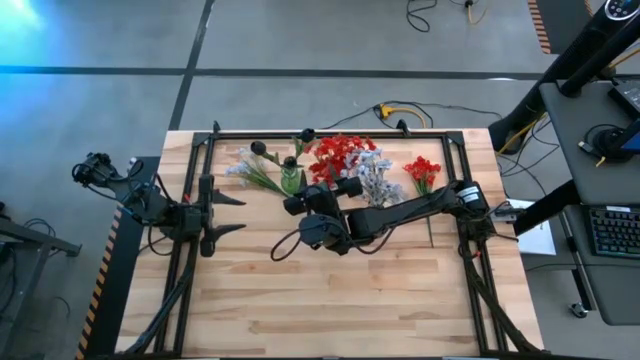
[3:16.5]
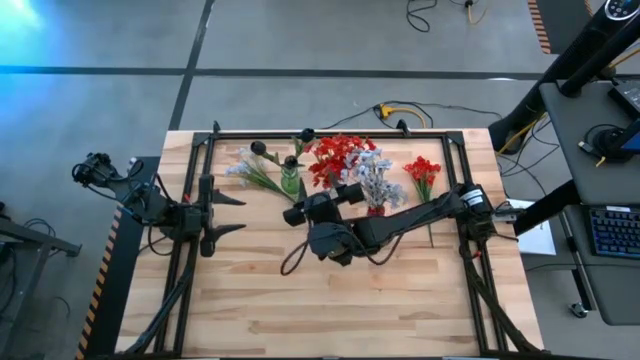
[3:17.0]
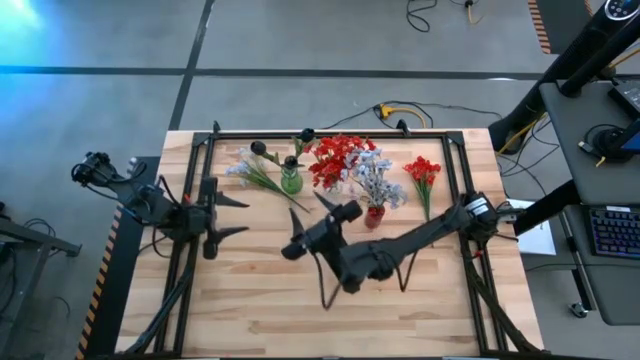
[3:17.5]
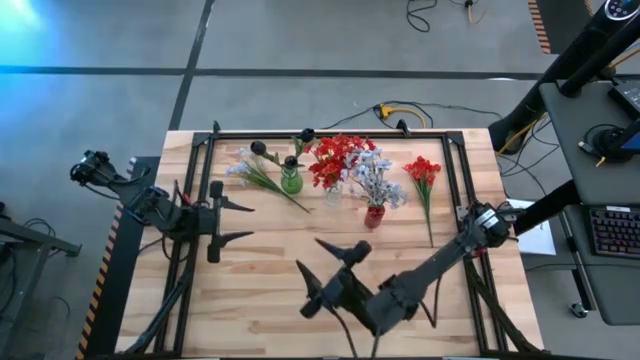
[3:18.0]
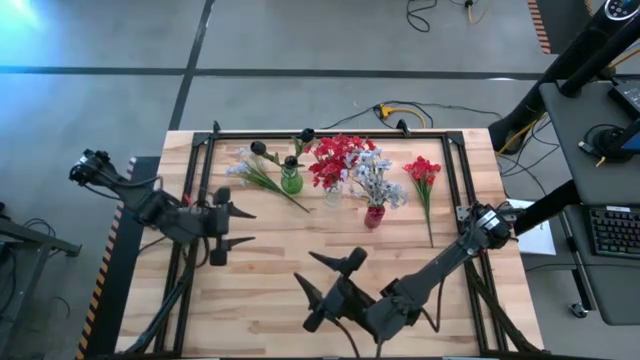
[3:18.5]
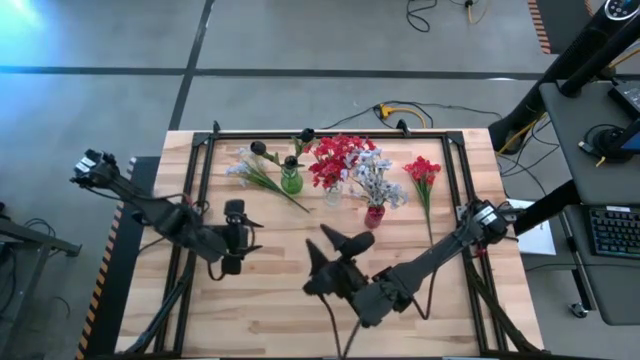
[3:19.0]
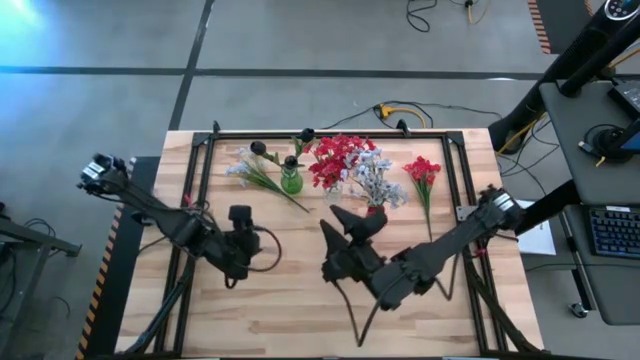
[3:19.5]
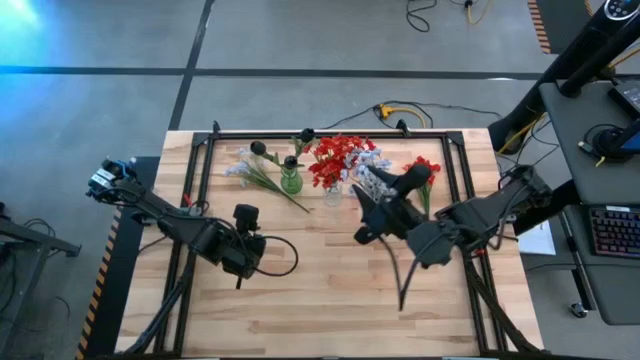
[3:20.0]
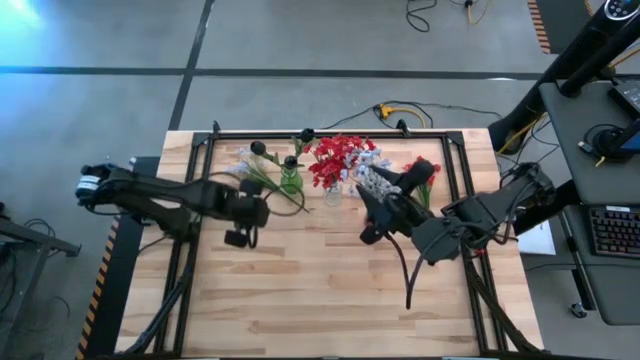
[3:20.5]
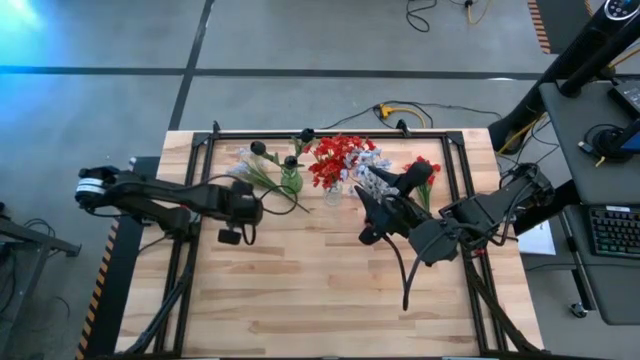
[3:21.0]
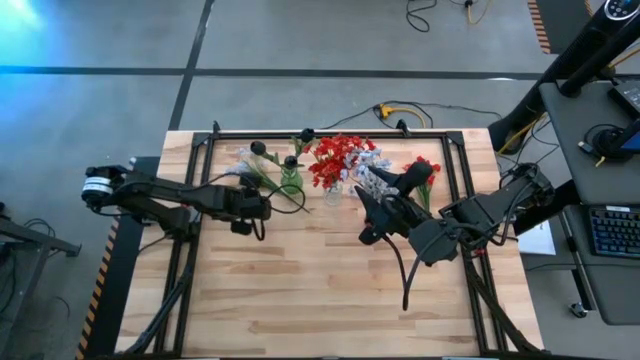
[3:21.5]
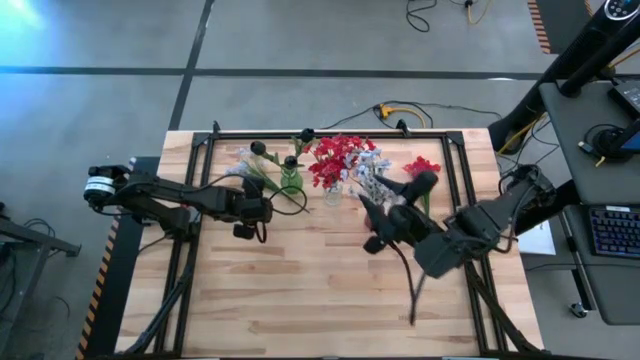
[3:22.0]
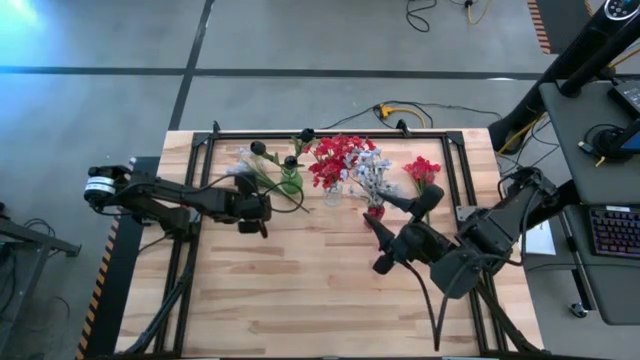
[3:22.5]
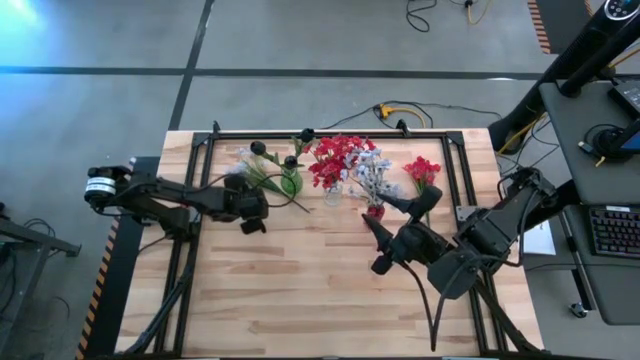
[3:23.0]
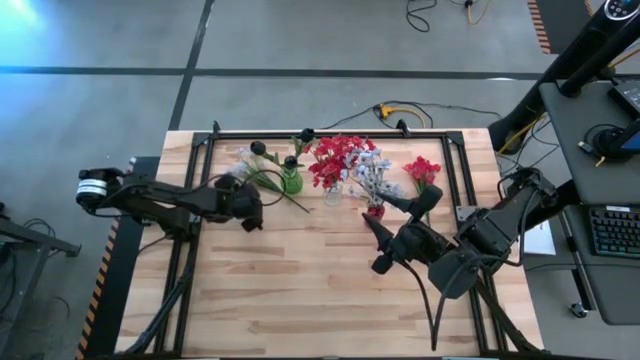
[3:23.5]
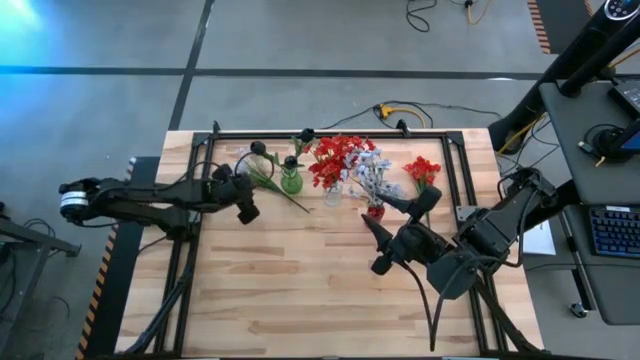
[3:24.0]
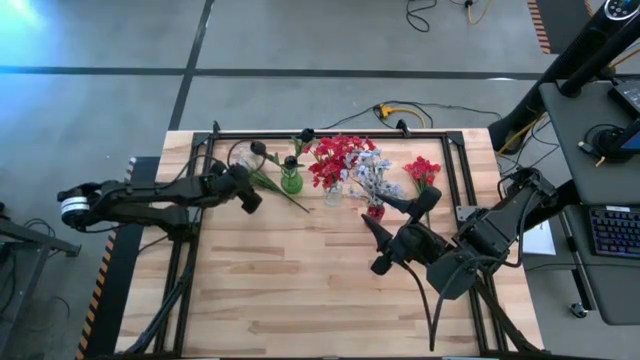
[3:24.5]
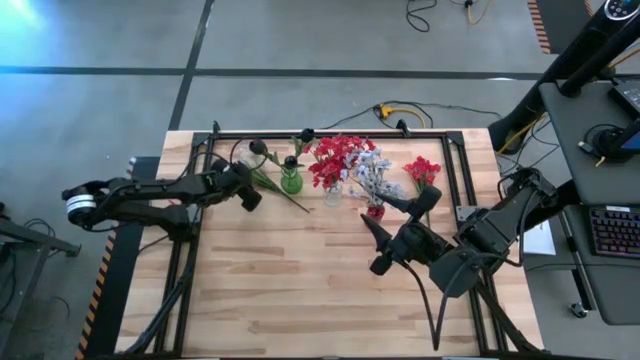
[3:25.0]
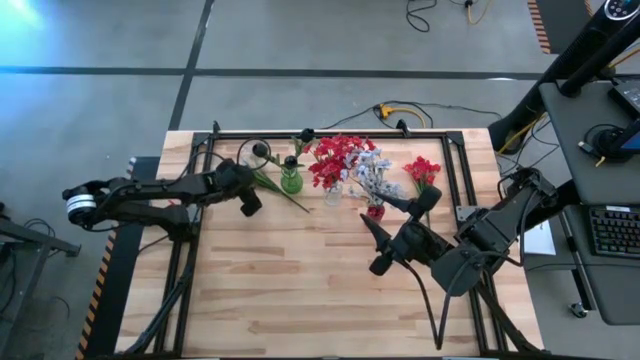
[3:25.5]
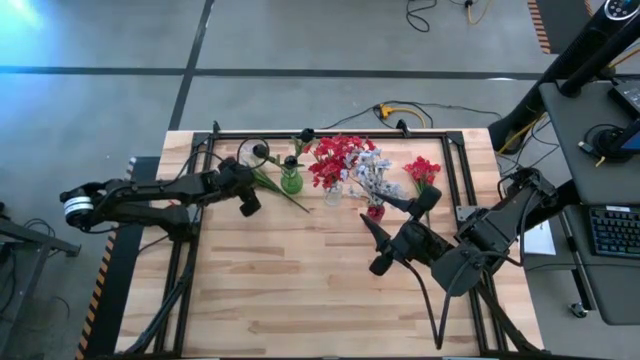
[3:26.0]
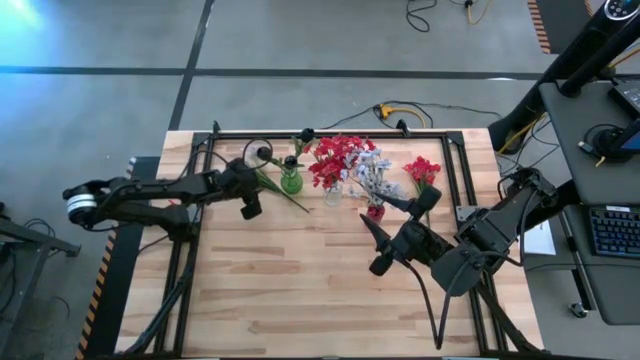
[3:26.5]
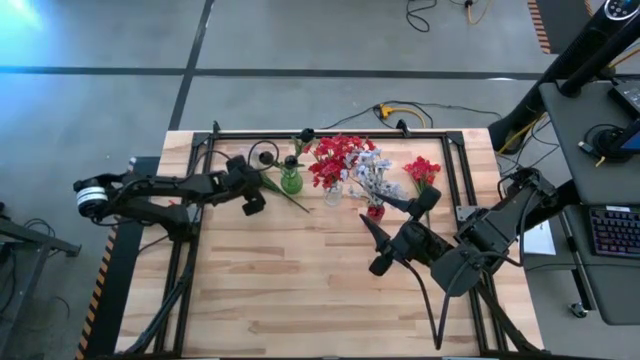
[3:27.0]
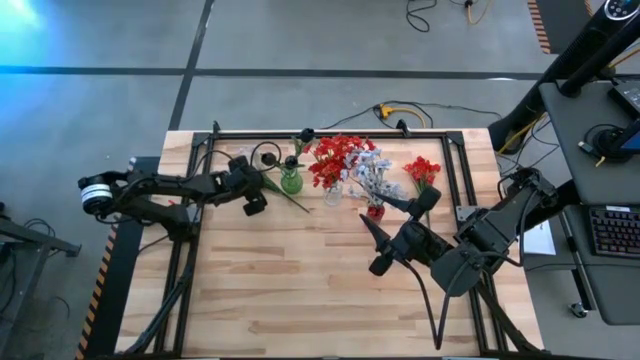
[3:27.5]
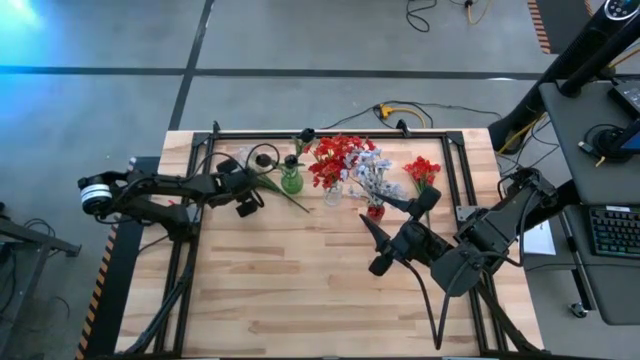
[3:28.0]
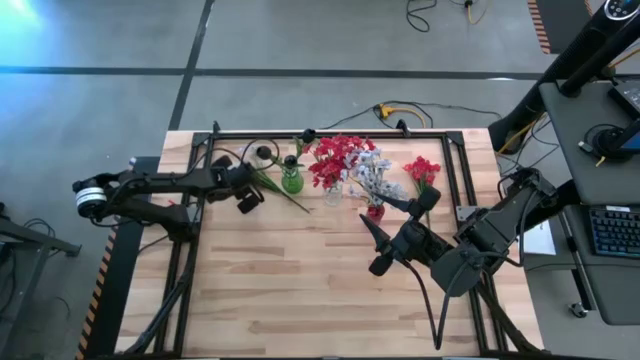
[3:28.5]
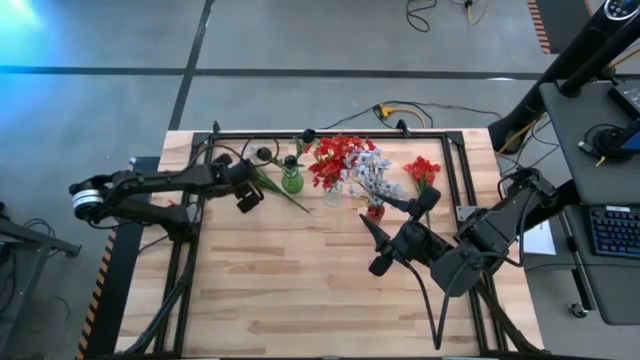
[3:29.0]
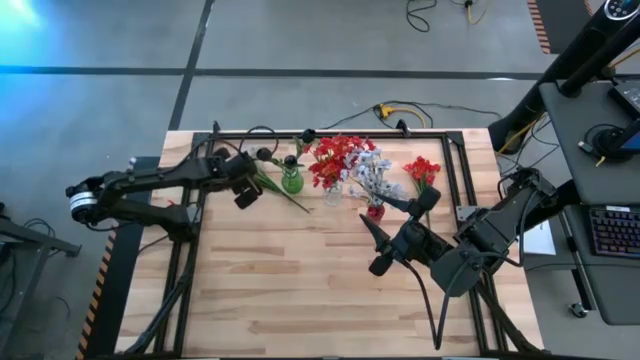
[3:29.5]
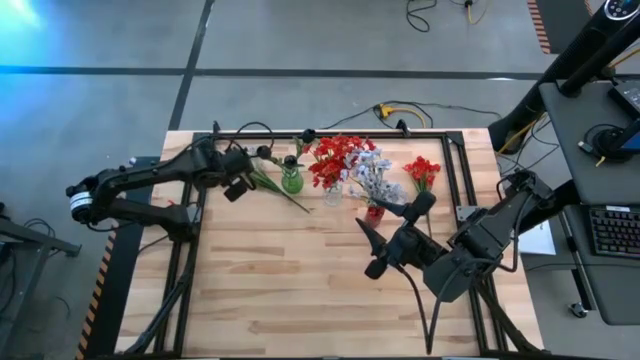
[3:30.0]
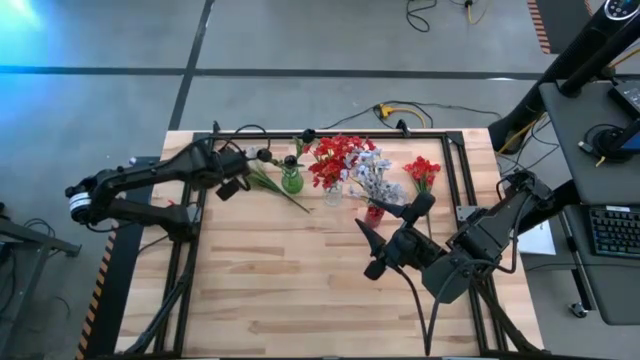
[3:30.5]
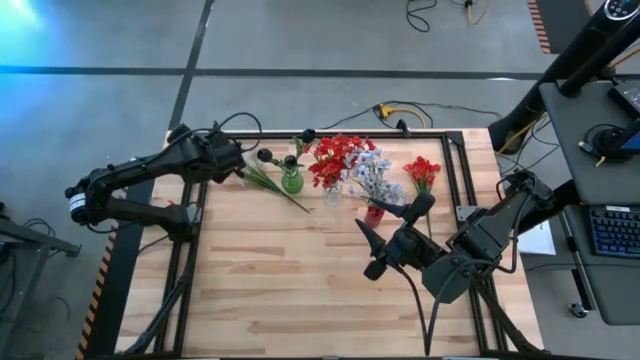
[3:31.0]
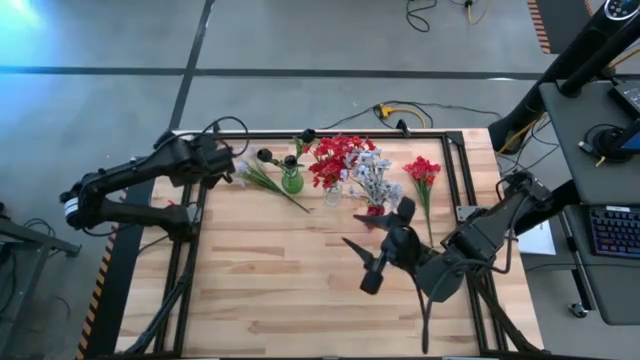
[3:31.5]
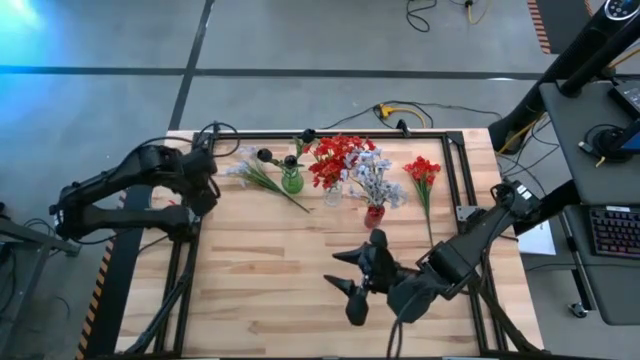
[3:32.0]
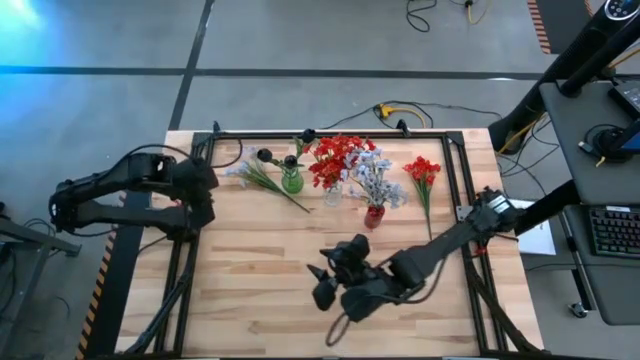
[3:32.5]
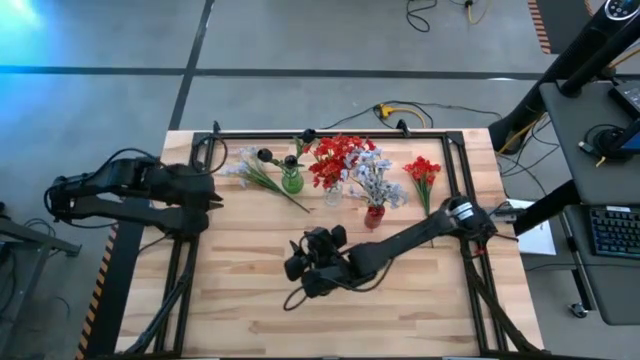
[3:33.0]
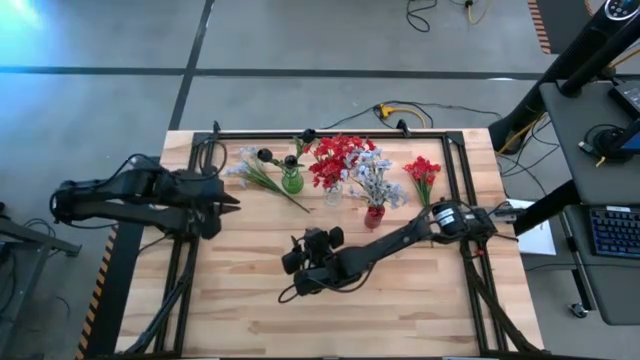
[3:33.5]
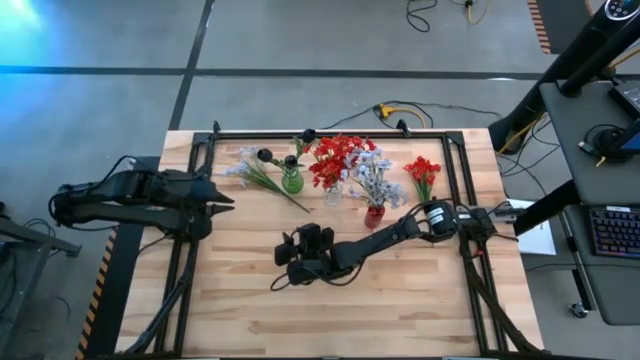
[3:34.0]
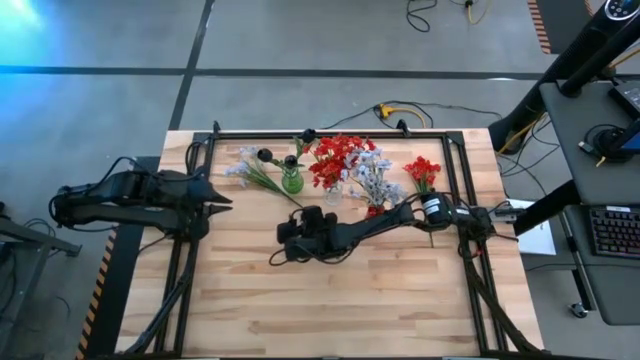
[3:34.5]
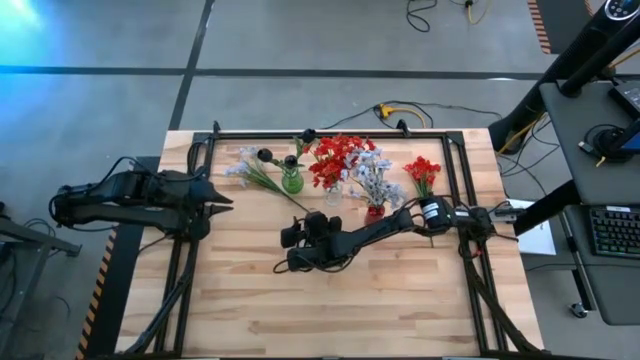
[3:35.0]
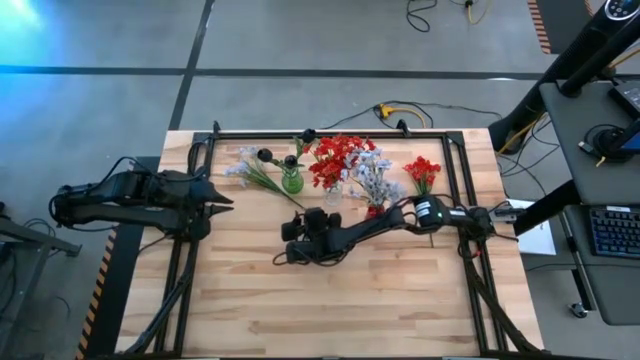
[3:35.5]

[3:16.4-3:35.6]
Task: Sort flowers into vase by color
Put the white flowers into the red vase

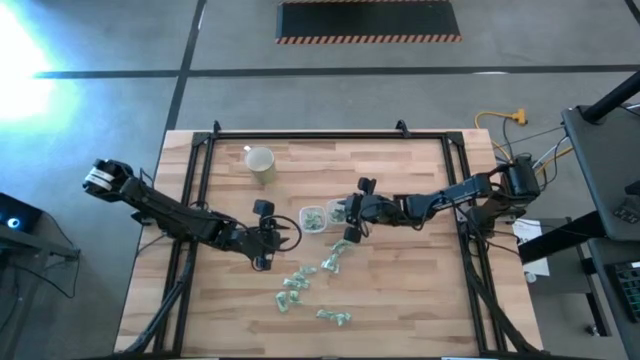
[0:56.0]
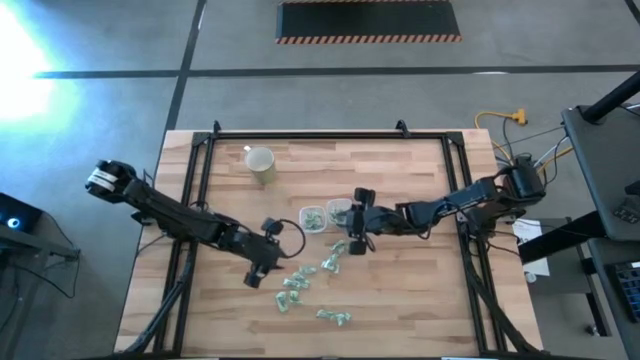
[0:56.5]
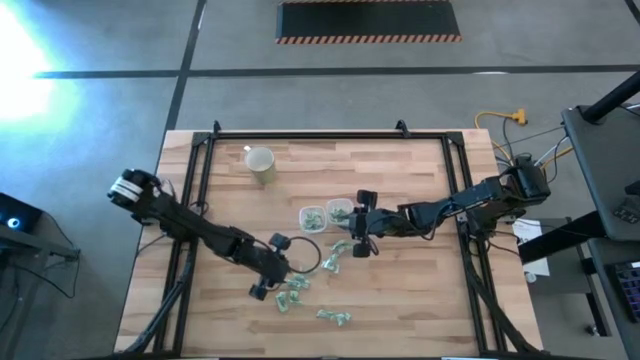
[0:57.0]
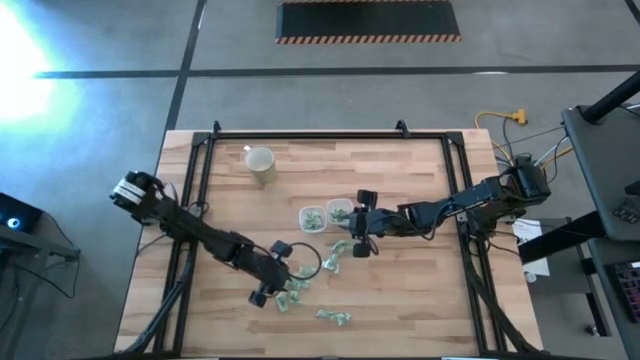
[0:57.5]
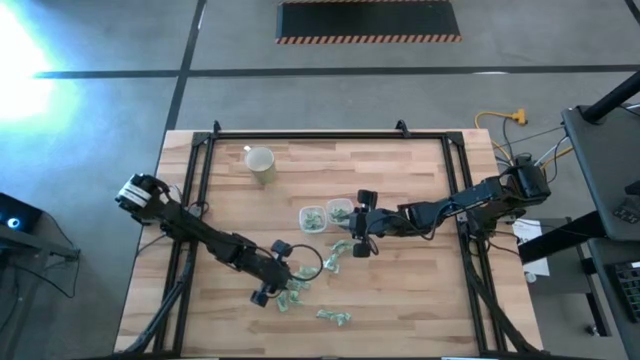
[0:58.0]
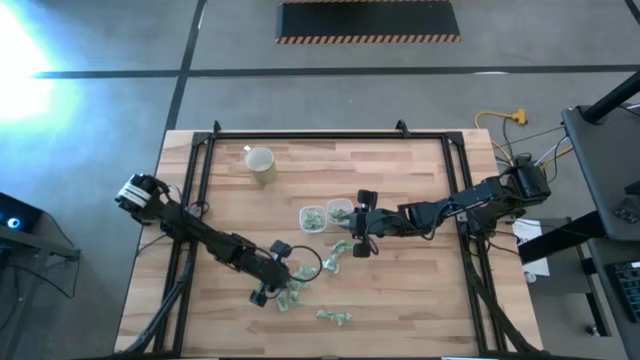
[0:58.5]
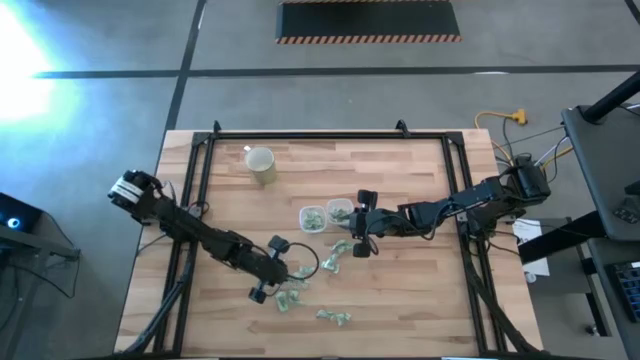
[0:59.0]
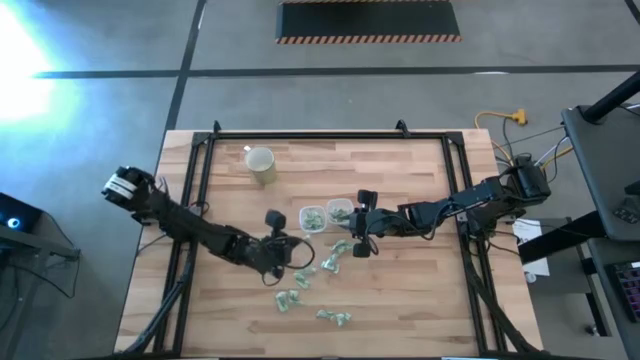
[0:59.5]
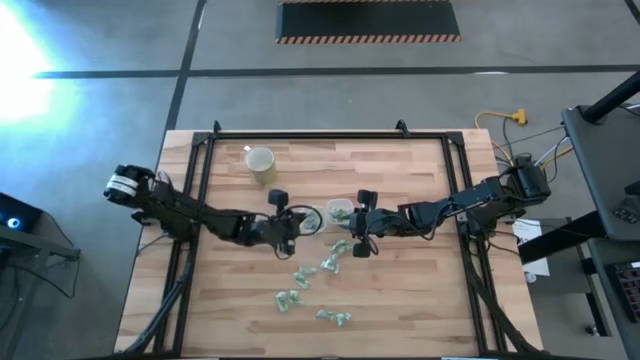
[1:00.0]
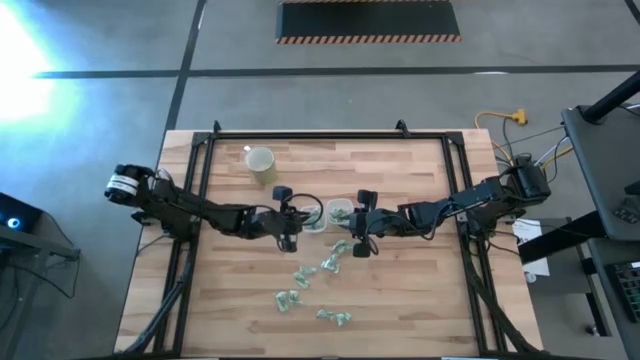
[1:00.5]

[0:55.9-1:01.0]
Task: Pick and place items into bin
Put the stevia packet into the left transparent bin
